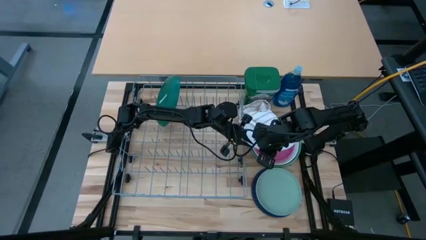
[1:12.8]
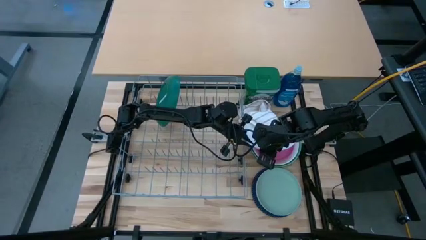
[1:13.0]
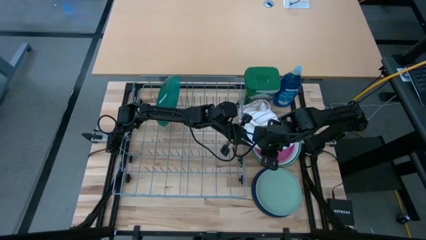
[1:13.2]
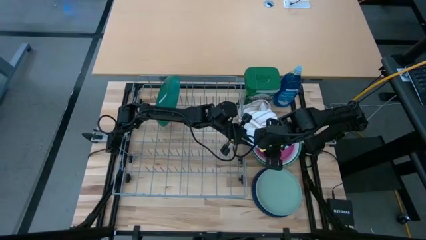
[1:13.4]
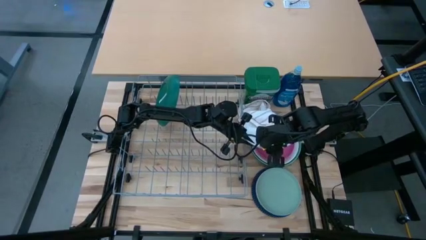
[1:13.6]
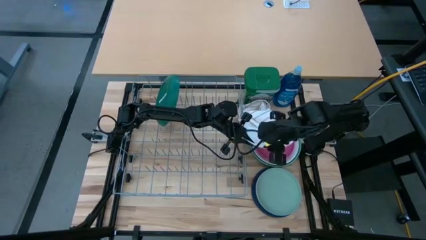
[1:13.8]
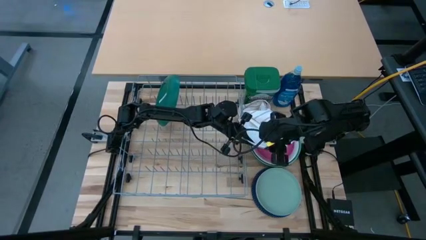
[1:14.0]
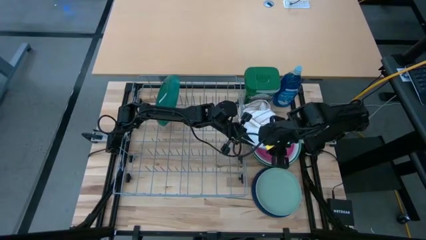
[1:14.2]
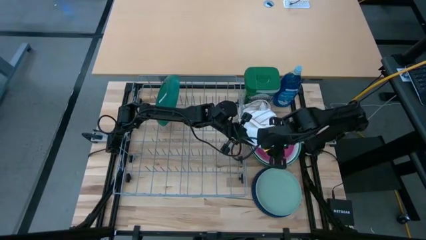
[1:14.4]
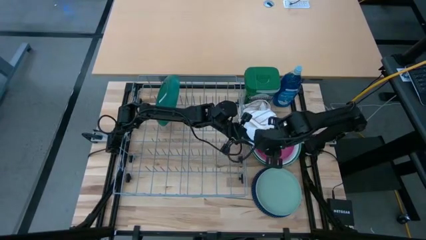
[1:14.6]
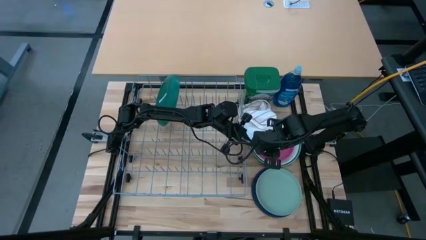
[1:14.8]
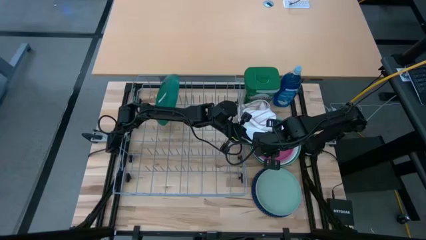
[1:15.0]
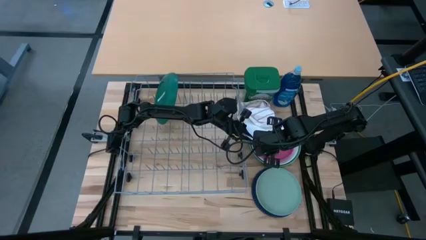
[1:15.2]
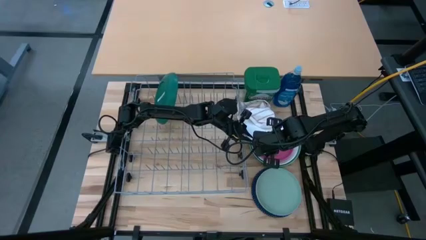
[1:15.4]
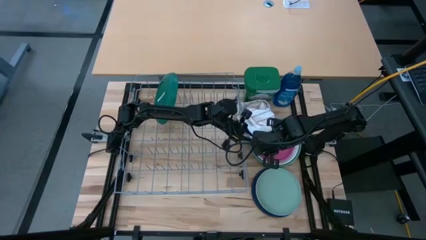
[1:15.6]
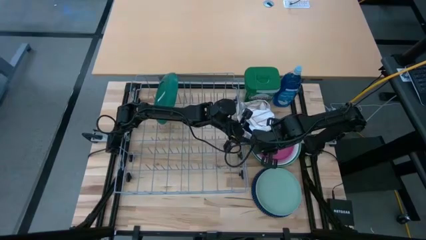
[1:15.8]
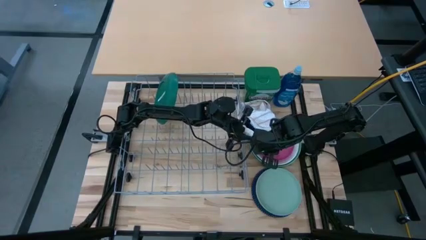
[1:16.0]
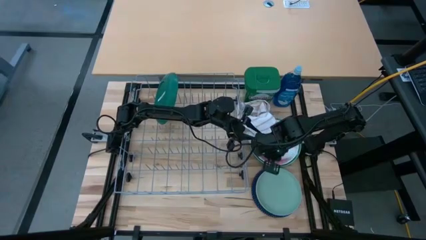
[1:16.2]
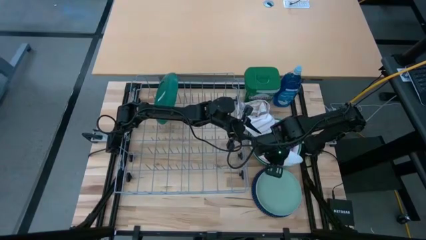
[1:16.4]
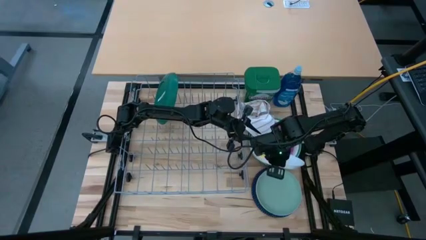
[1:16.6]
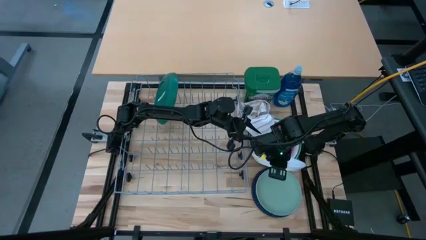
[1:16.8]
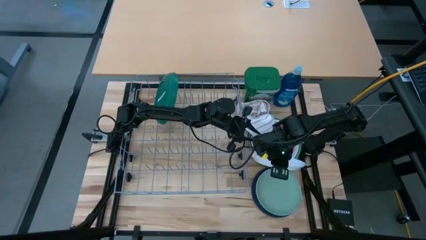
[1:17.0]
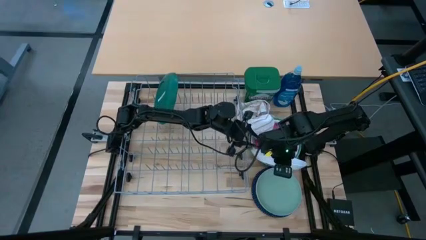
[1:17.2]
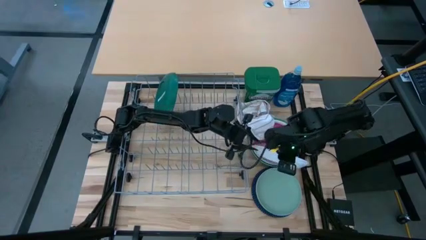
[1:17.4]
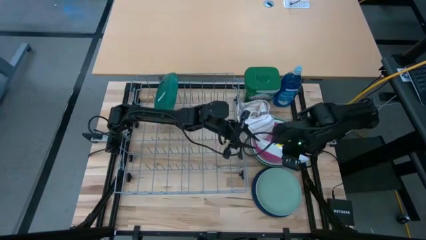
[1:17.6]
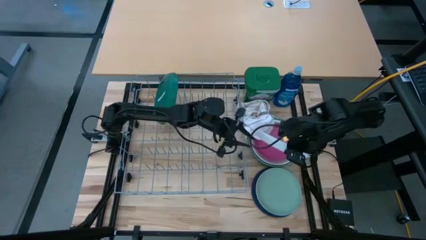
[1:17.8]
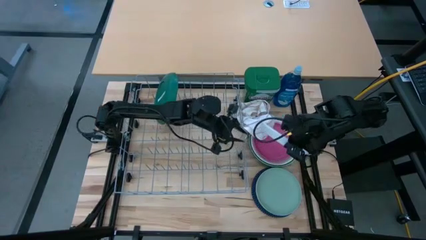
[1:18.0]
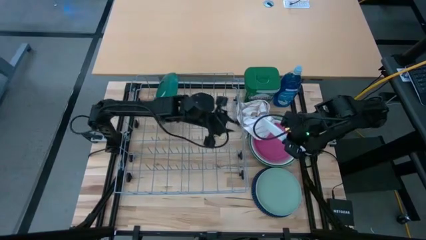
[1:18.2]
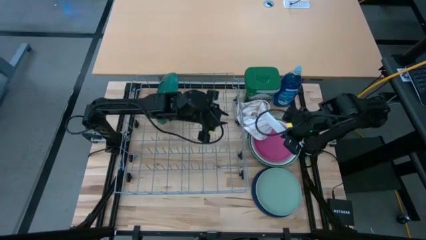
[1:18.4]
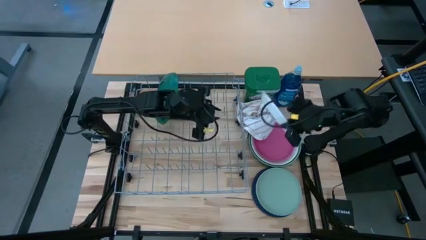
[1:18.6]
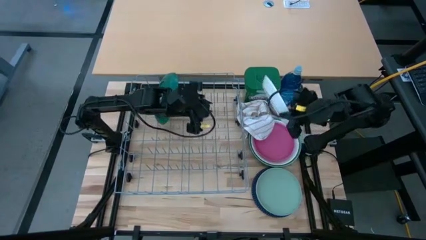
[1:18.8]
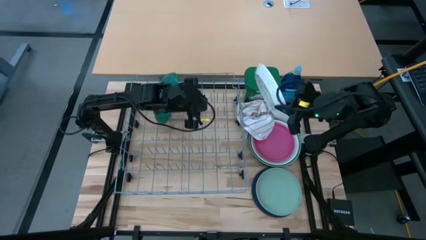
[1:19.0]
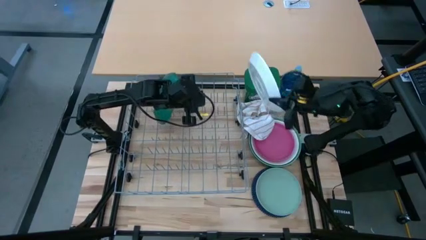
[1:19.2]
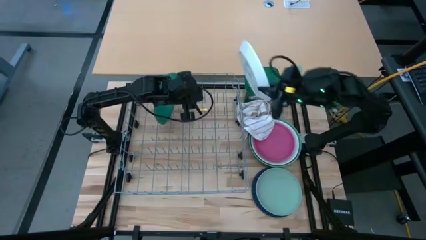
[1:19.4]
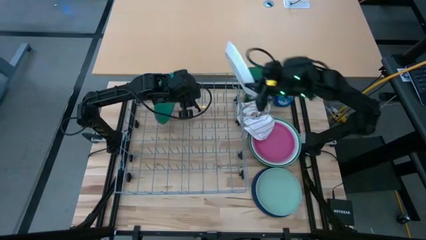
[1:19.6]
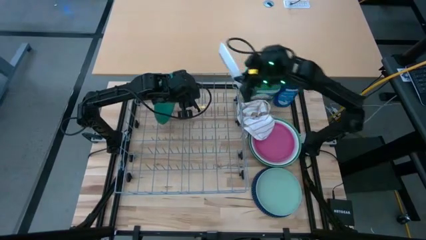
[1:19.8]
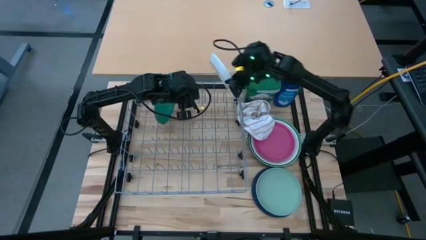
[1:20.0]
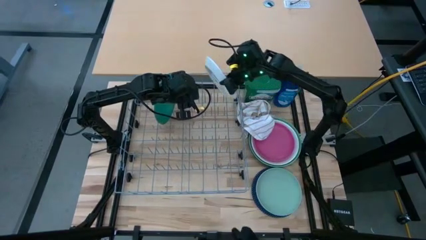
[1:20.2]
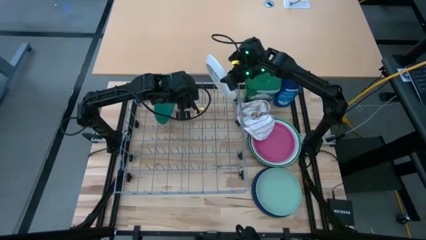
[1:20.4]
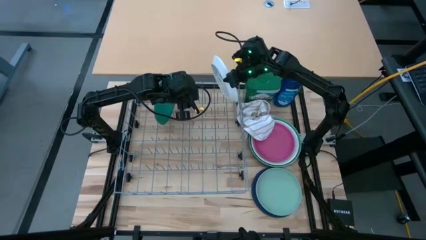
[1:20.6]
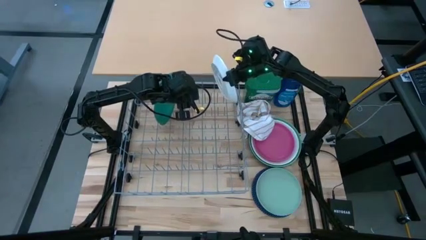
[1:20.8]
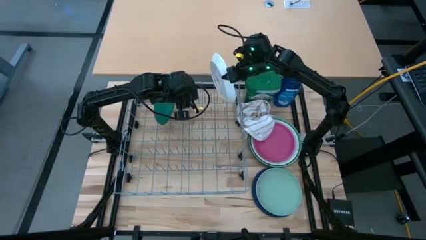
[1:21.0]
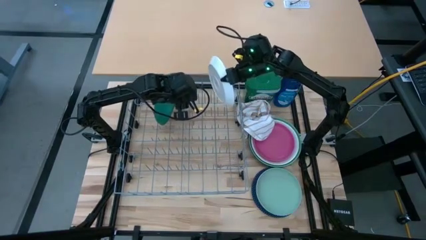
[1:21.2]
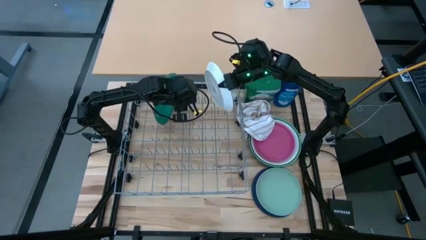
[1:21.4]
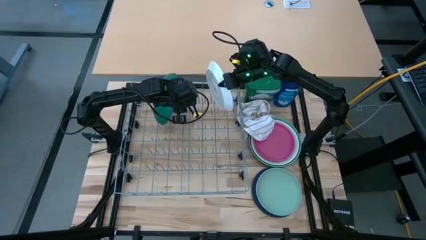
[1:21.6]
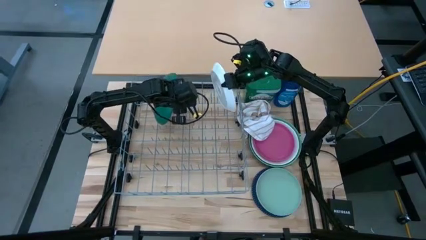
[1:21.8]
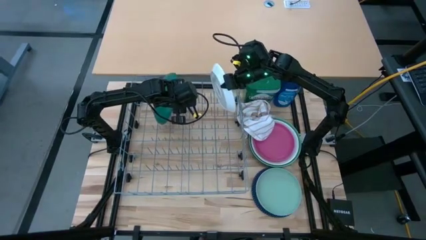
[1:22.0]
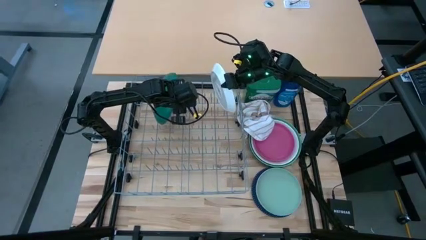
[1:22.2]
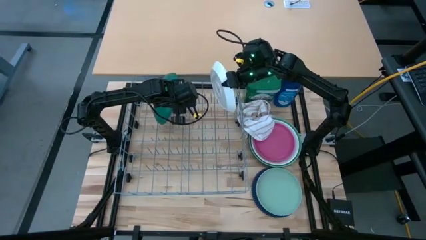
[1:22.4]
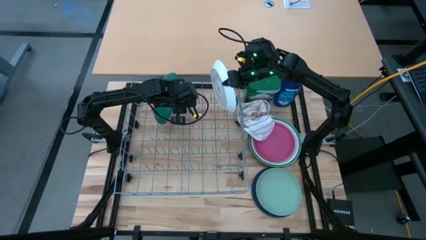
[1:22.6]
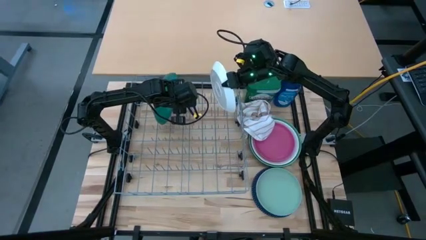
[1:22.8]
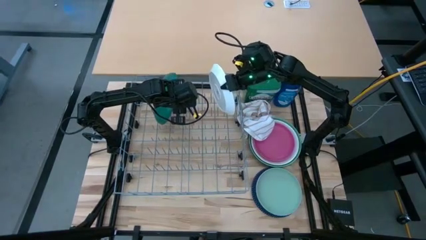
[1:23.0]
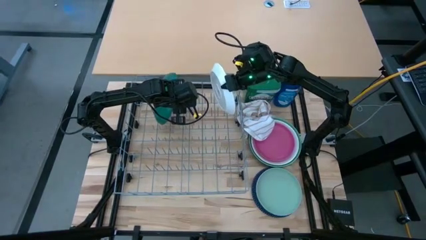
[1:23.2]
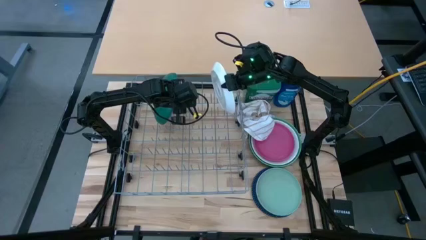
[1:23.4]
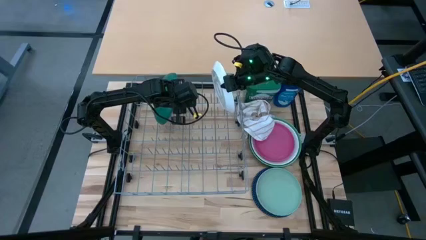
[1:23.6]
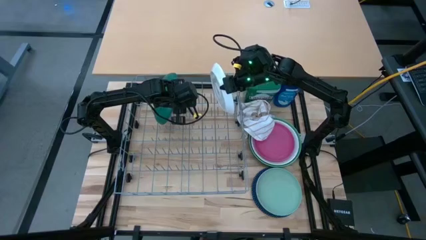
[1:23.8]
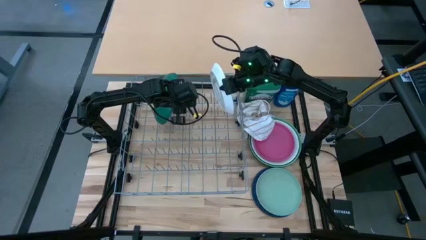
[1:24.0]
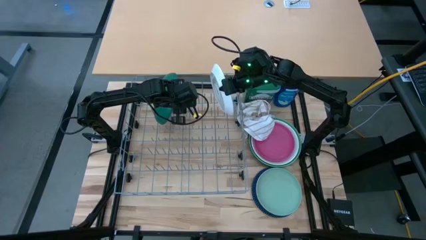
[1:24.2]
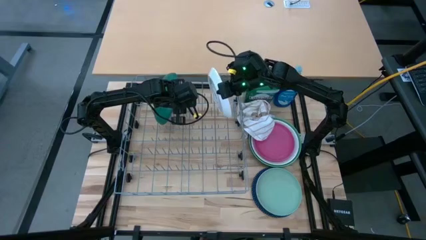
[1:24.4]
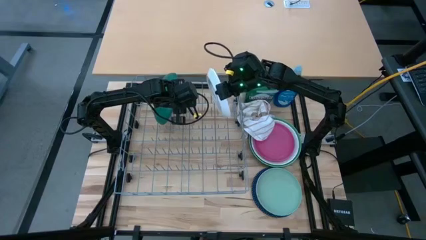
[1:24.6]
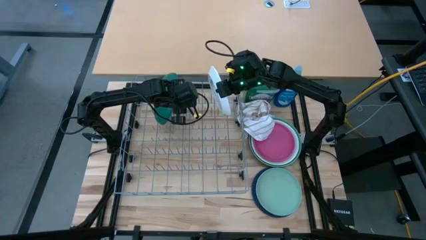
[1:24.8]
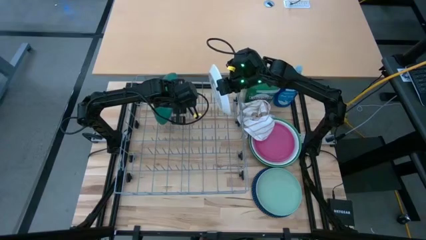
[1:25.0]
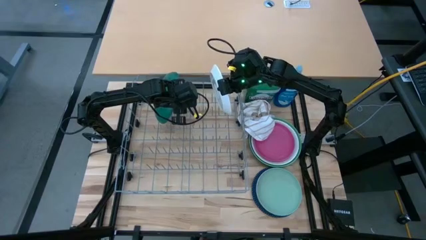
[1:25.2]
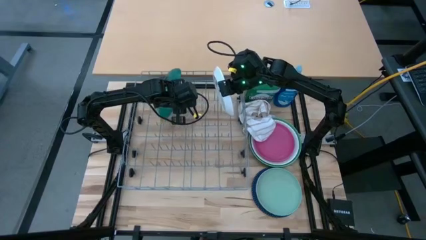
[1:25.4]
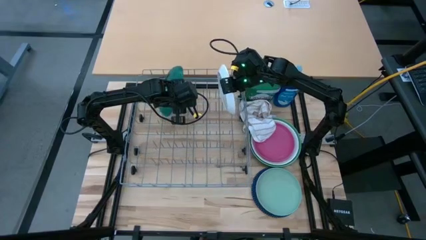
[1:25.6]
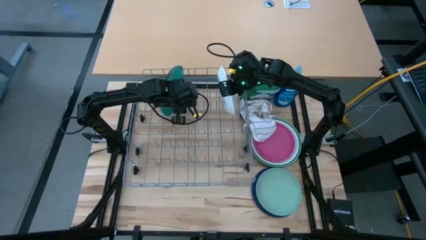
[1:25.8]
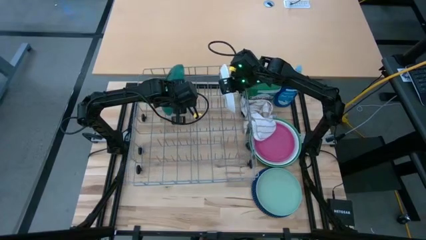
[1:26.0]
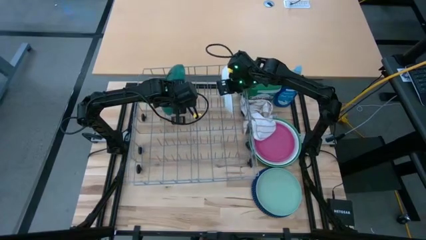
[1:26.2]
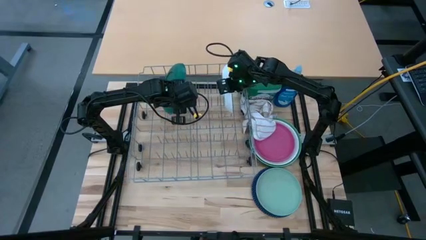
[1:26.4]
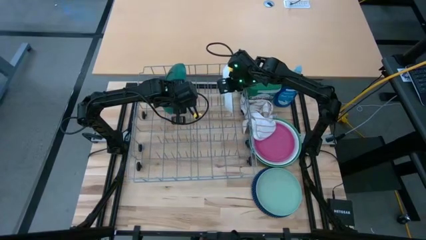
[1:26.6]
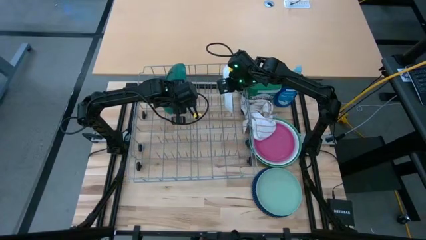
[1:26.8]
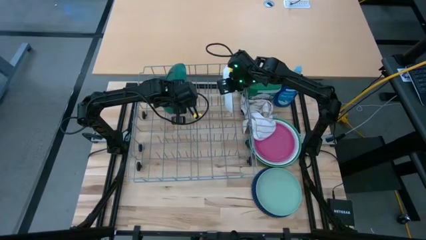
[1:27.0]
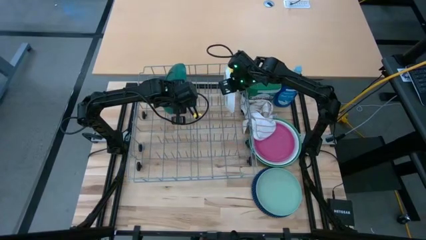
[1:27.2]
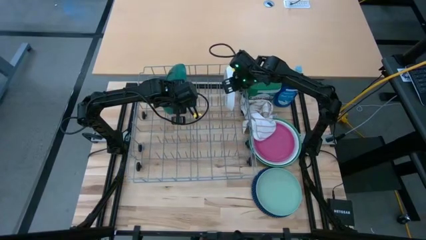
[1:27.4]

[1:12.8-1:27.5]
Task: Sort dishes
Put the white plate in the dish rack
